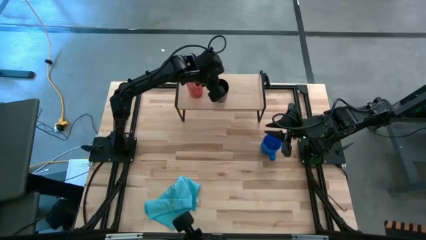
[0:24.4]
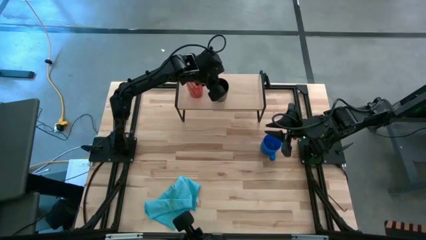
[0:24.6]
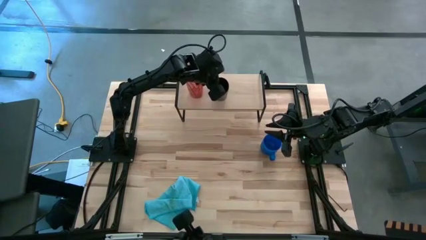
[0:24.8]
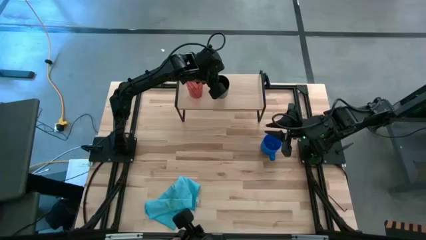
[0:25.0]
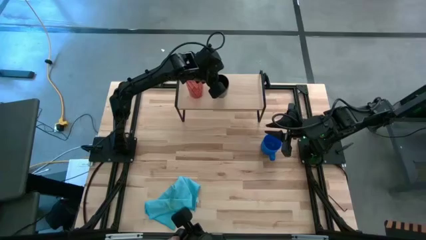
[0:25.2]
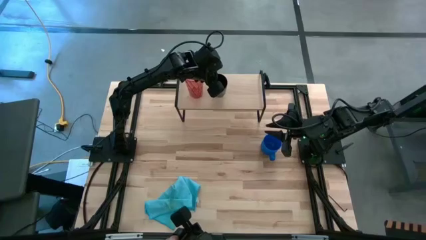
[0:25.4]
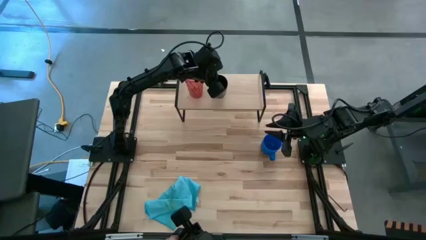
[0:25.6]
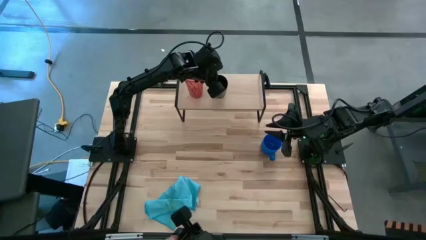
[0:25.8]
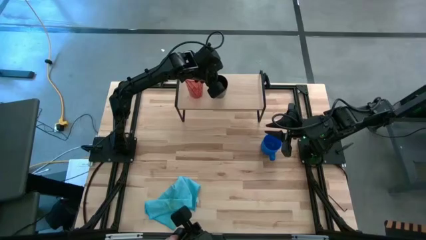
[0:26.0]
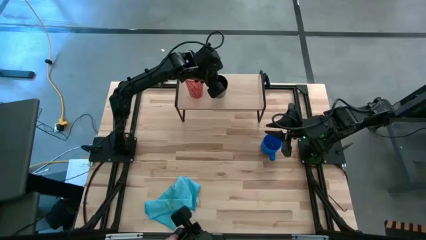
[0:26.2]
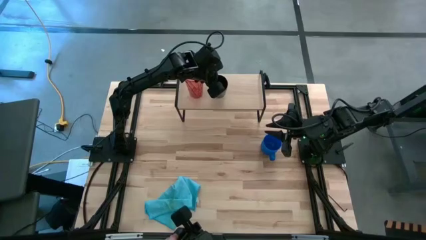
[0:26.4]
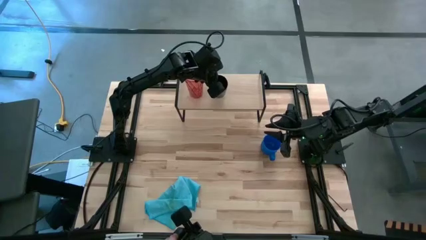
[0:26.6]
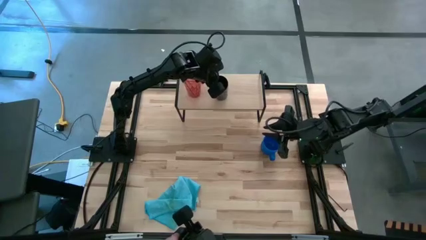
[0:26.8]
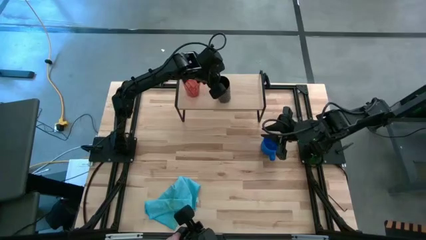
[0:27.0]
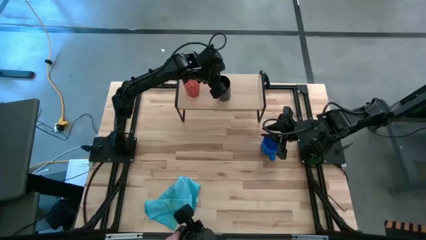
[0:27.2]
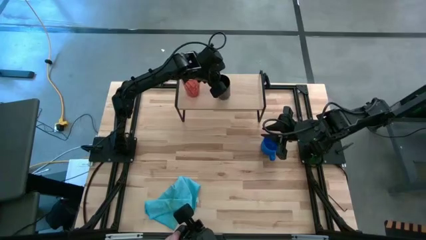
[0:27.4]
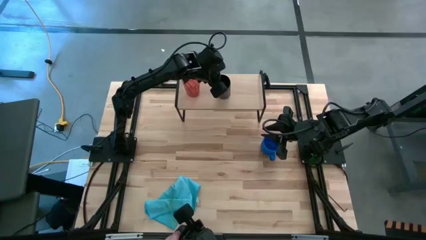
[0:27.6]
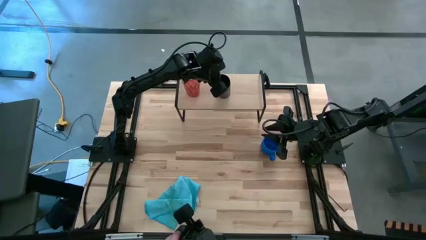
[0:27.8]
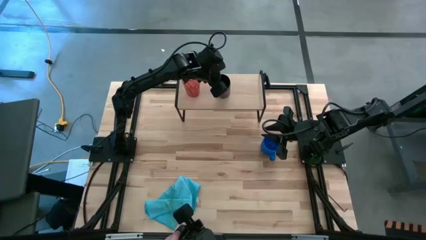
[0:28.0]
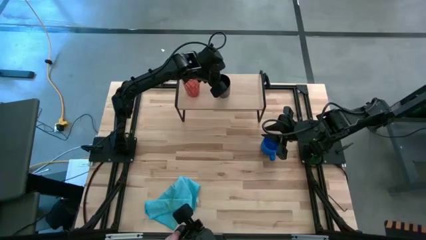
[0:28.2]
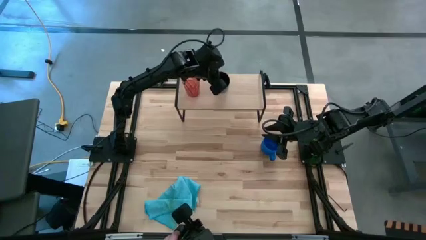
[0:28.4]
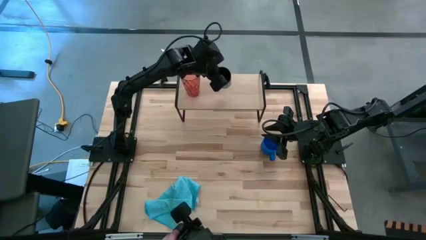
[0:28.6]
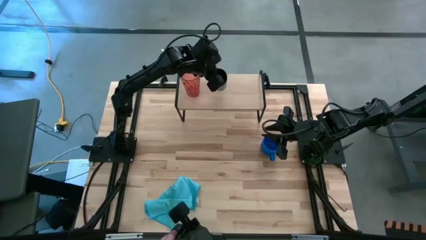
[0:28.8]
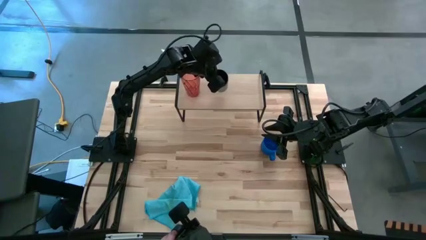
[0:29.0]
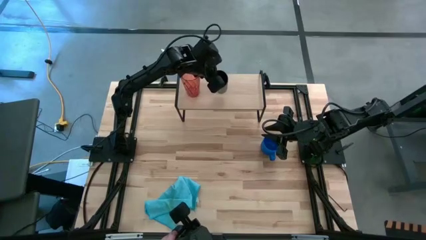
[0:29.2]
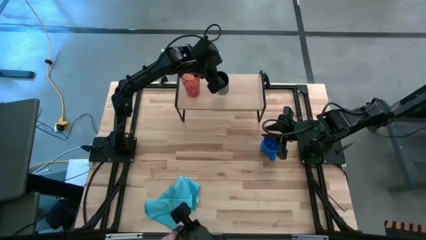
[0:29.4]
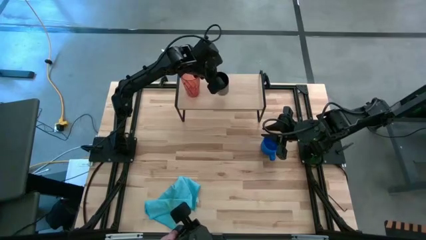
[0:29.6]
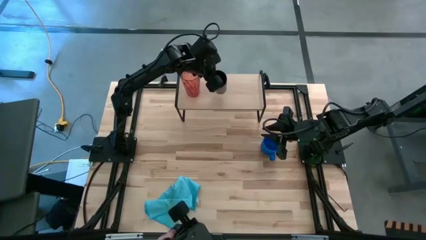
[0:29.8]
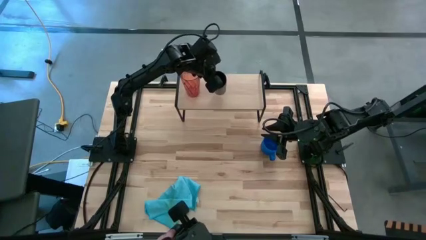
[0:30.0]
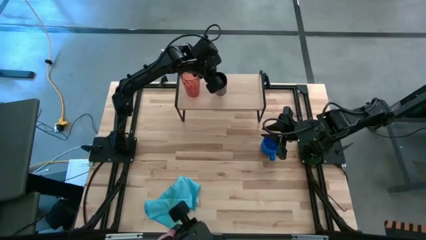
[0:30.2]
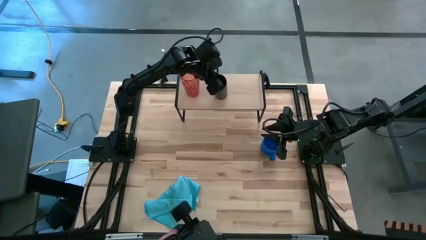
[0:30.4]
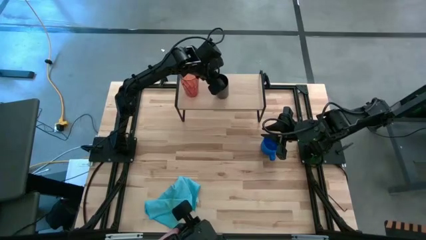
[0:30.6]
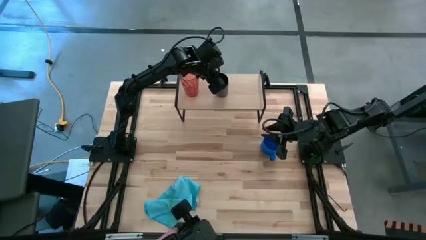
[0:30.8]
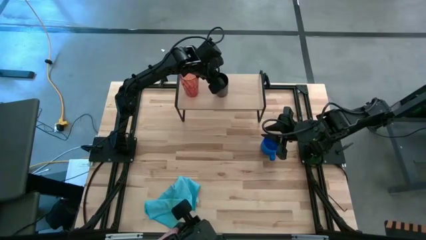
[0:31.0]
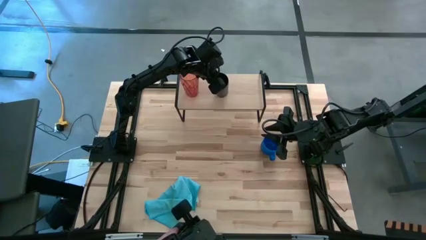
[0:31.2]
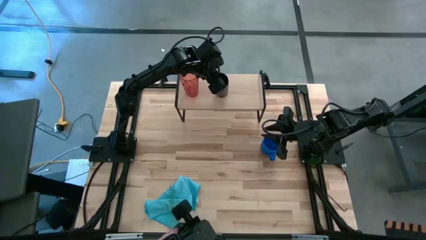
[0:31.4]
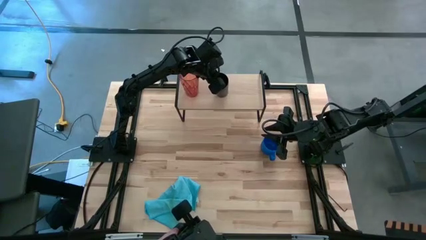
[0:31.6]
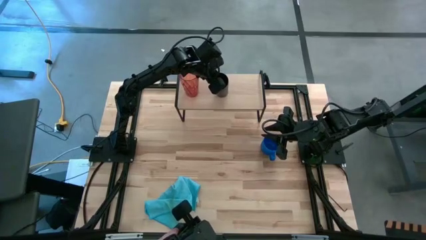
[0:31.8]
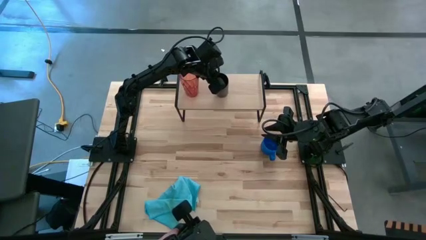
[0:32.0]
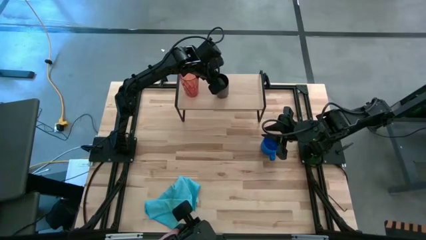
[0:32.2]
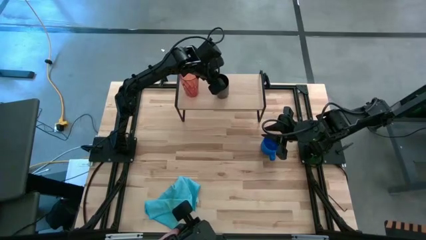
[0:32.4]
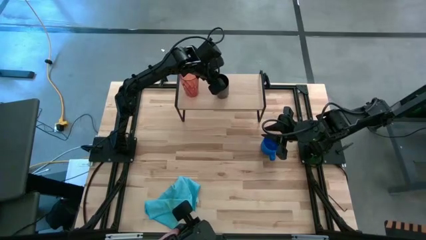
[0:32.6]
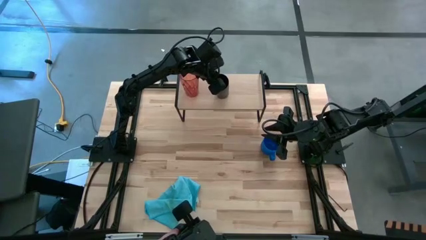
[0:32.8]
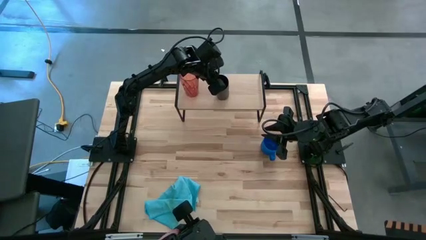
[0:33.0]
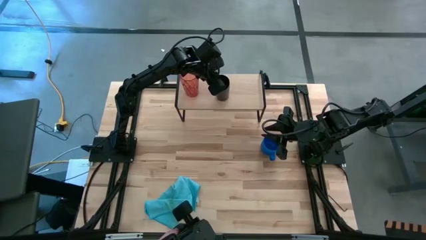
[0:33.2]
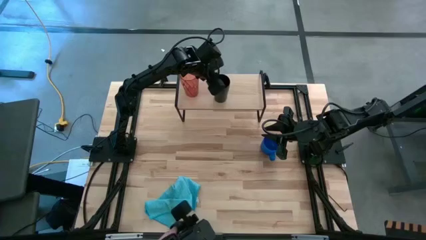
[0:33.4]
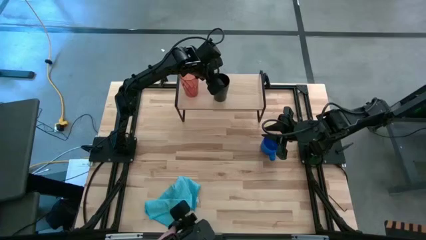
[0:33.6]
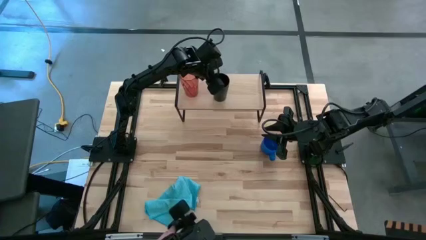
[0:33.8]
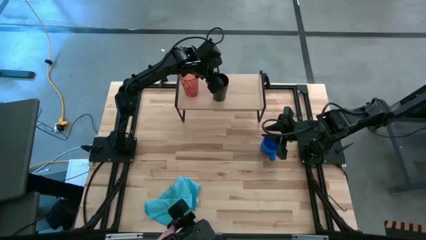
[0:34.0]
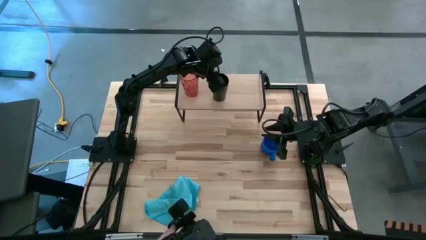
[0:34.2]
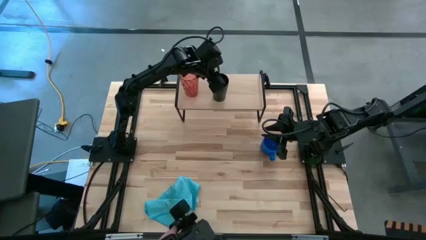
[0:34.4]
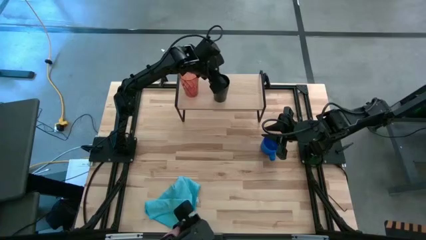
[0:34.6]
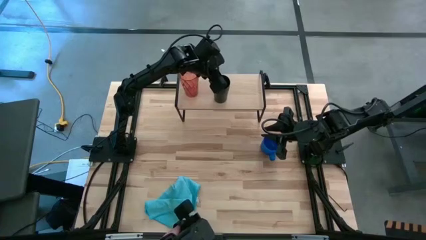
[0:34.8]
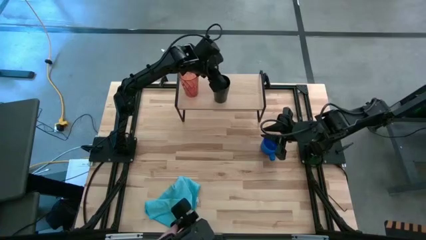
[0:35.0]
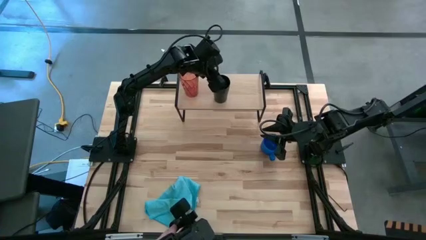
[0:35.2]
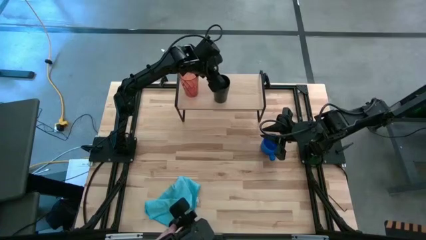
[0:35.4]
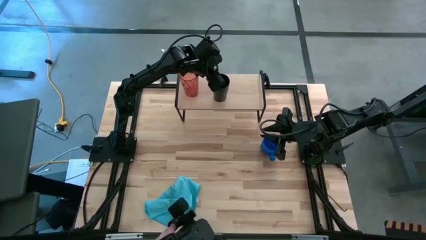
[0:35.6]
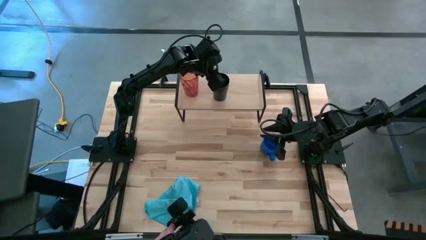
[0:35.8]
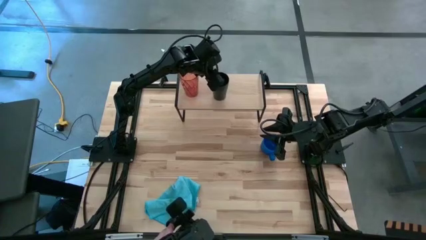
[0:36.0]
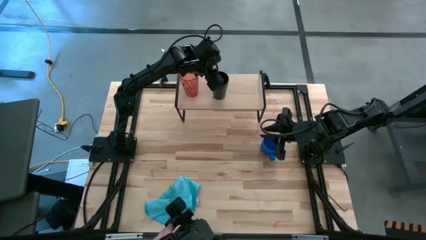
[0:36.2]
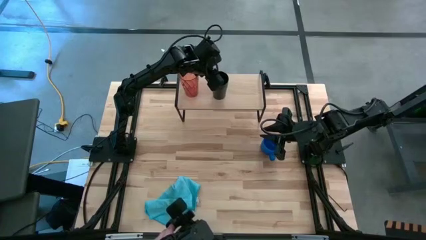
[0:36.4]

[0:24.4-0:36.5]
Task: Stack small to large cups/mugs on shelf
Put the black cup on the shelf

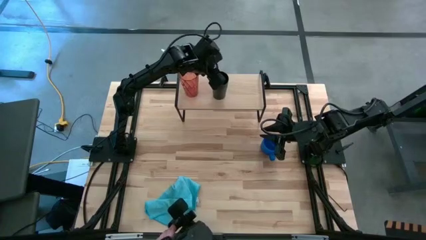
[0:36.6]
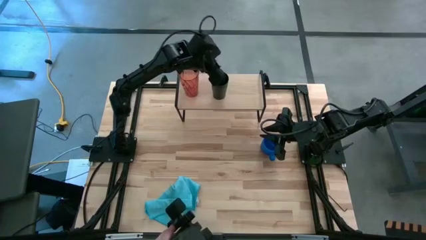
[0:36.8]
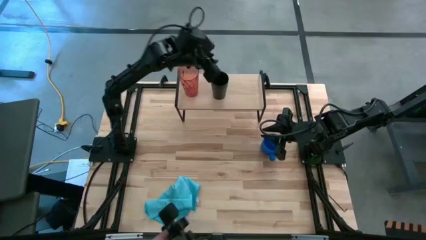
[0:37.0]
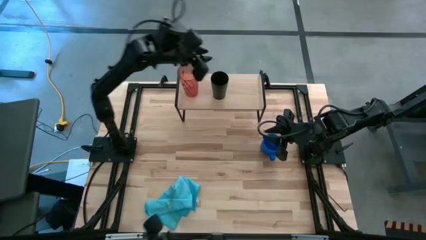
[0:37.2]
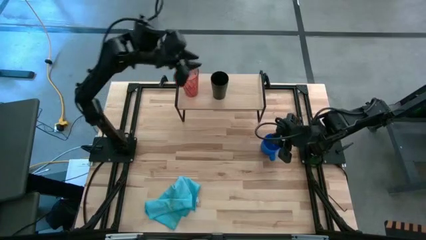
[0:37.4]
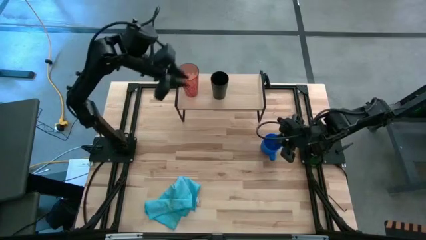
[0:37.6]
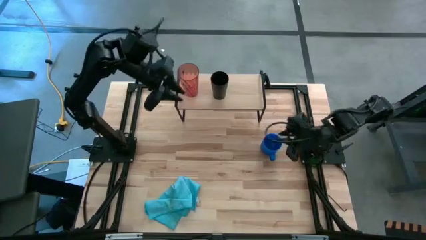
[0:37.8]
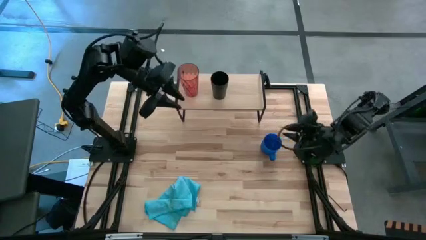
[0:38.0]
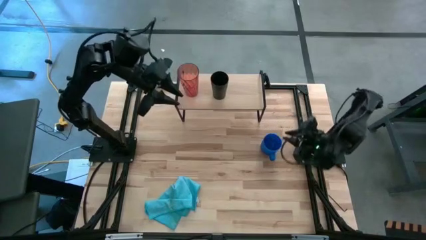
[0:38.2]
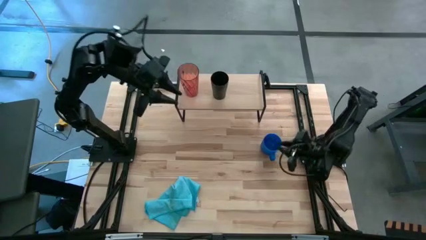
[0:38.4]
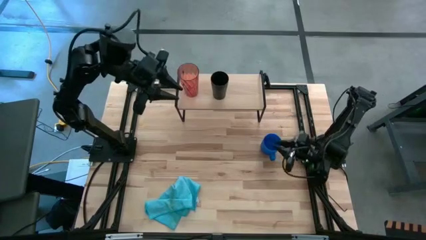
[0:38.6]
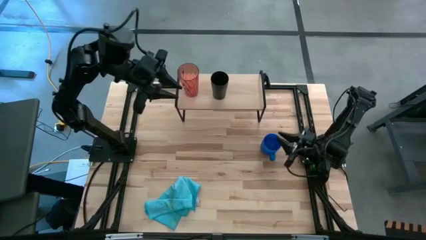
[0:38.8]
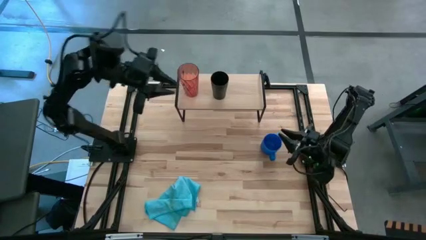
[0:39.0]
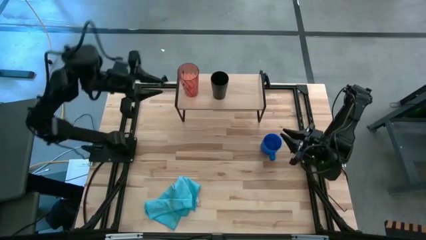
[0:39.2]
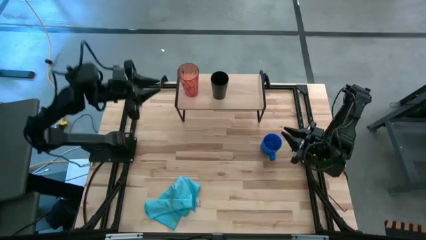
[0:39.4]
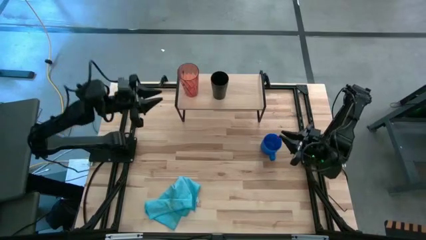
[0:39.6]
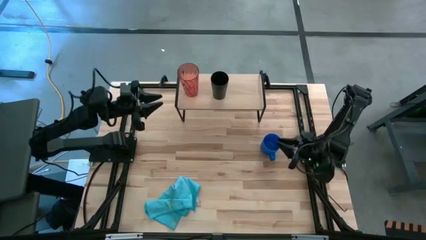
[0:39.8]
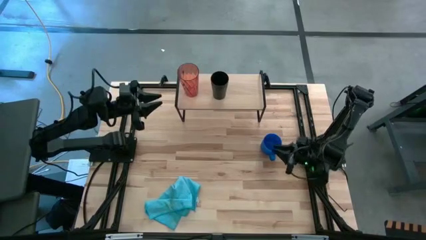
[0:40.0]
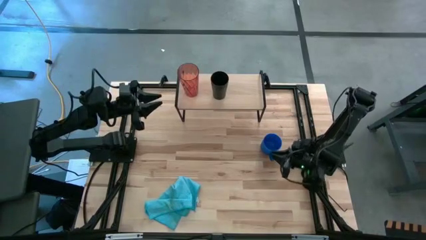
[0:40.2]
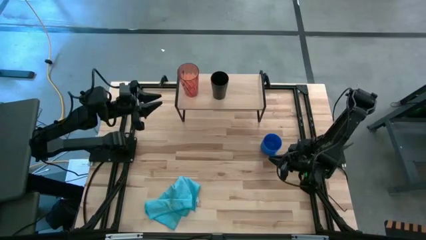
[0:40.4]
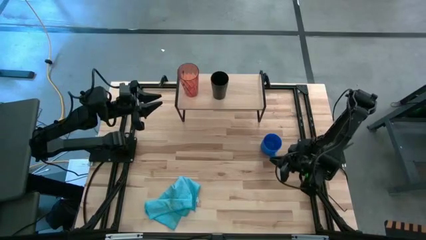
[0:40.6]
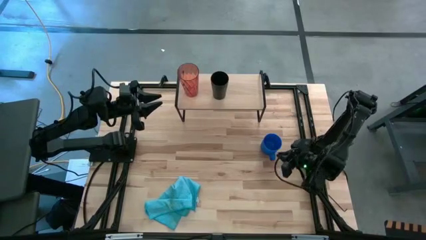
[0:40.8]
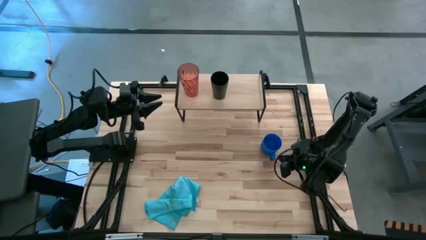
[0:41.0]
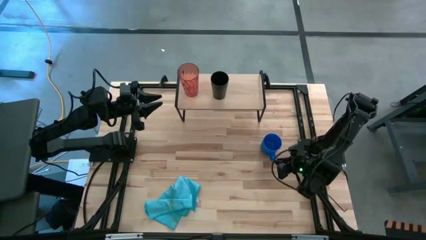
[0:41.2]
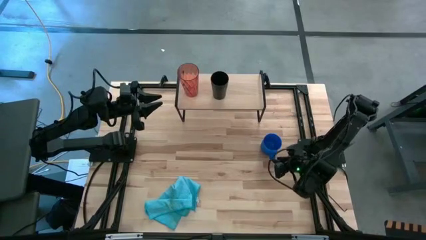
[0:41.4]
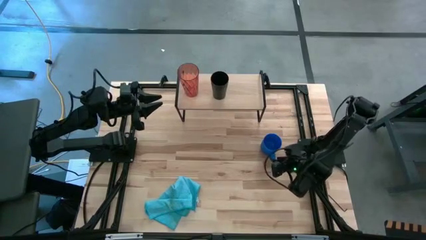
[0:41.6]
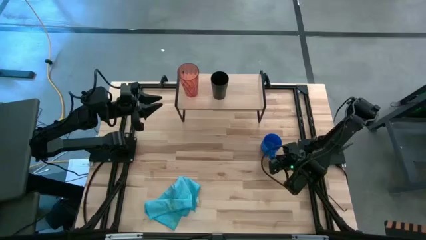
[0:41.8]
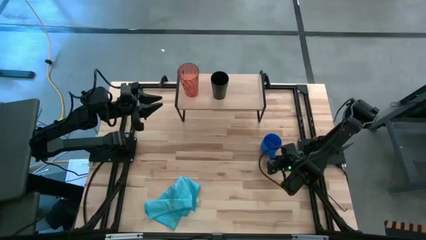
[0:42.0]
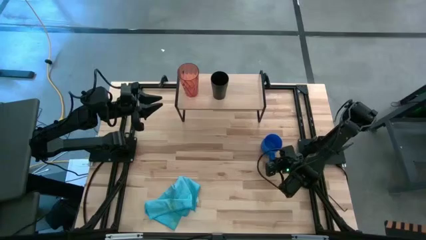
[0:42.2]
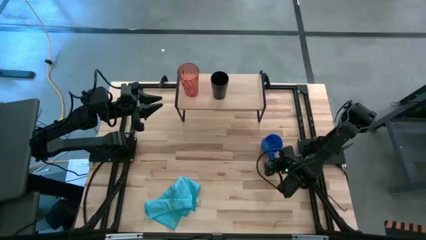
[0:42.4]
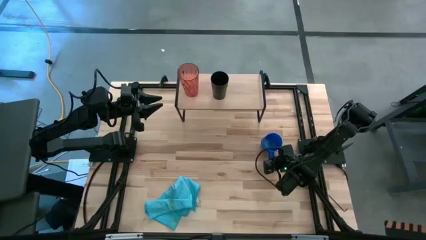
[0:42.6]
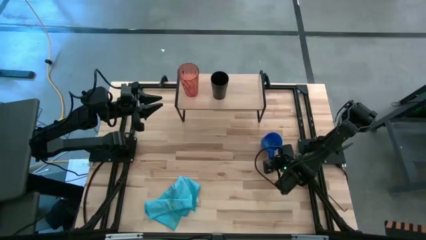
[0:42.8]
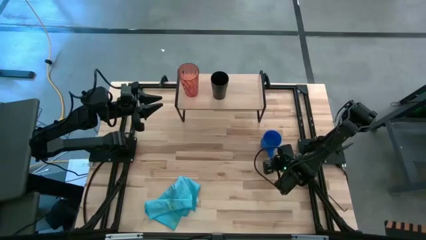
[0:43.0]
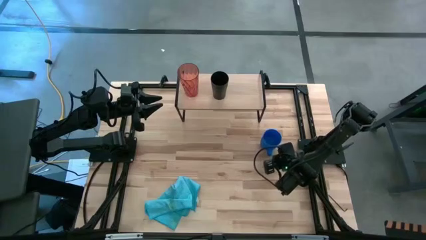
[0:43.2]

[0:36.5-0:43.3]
Put the blue mug on the shelf
